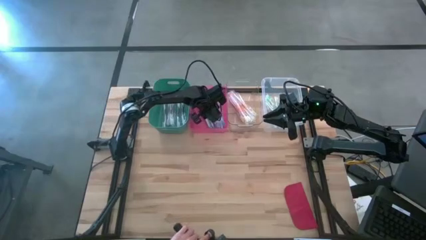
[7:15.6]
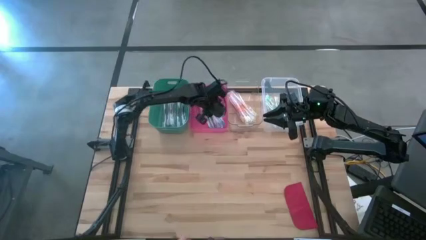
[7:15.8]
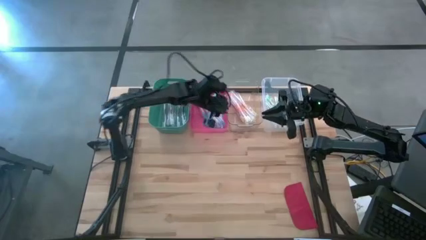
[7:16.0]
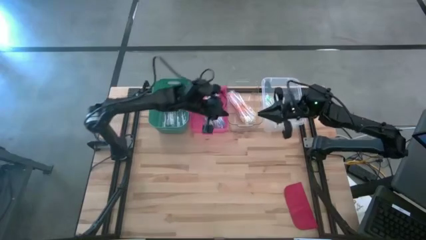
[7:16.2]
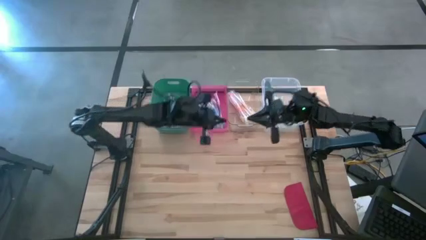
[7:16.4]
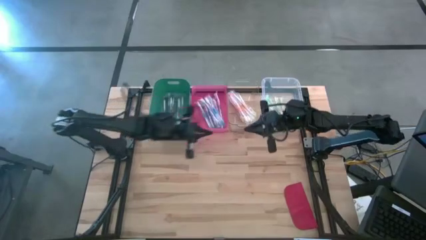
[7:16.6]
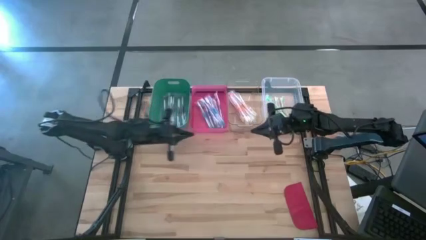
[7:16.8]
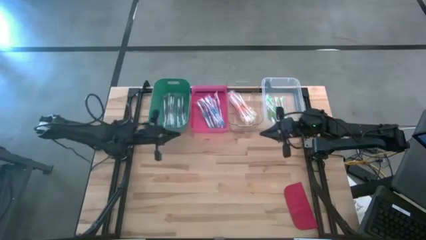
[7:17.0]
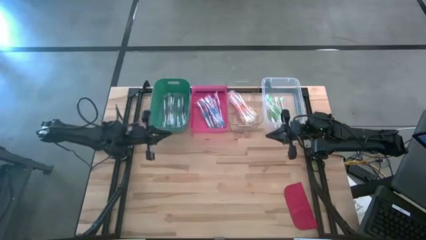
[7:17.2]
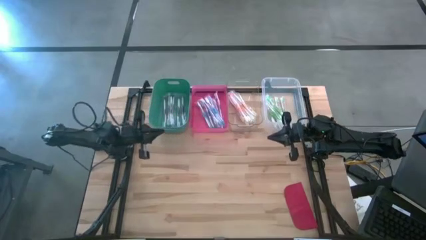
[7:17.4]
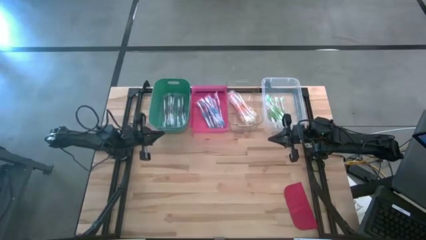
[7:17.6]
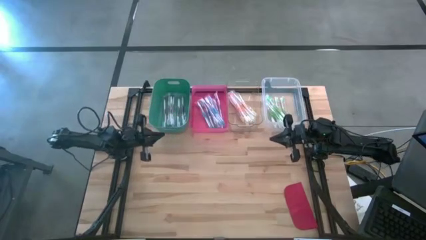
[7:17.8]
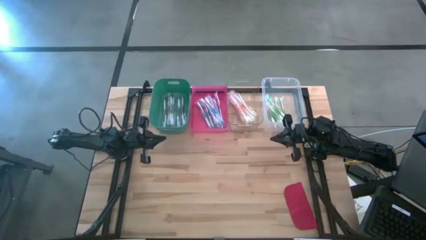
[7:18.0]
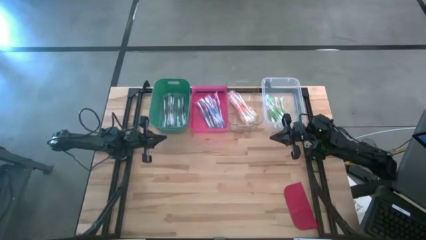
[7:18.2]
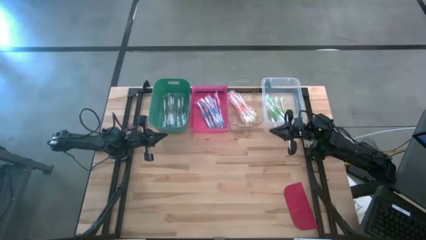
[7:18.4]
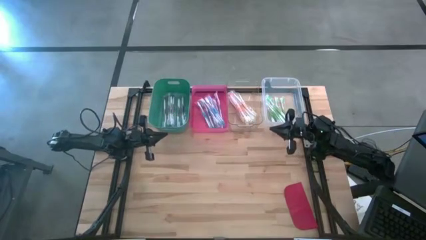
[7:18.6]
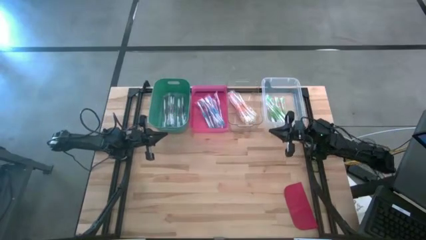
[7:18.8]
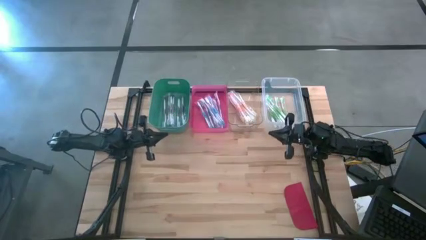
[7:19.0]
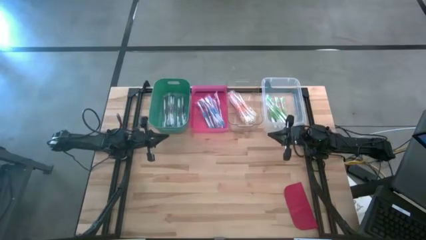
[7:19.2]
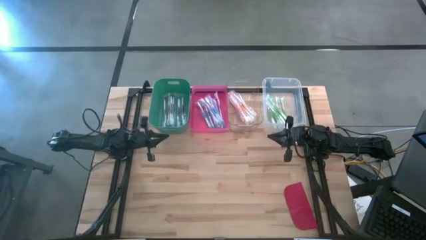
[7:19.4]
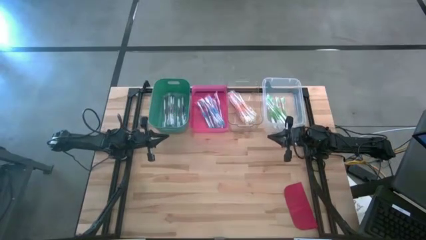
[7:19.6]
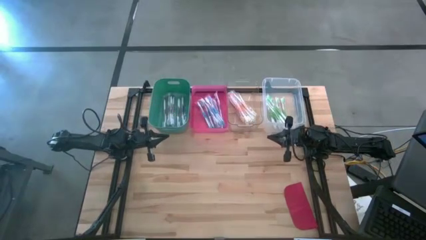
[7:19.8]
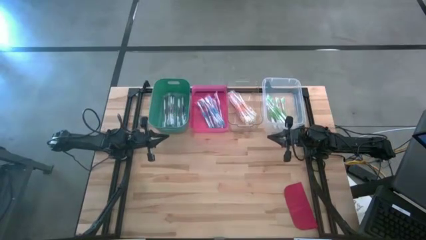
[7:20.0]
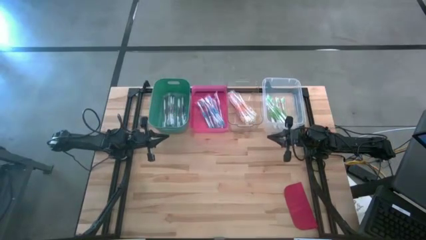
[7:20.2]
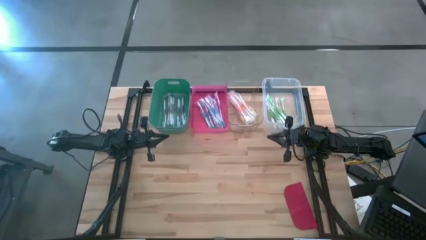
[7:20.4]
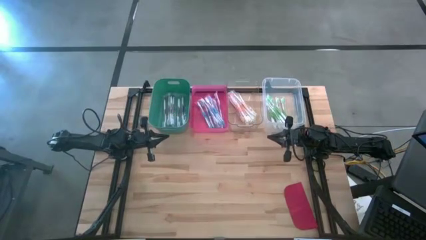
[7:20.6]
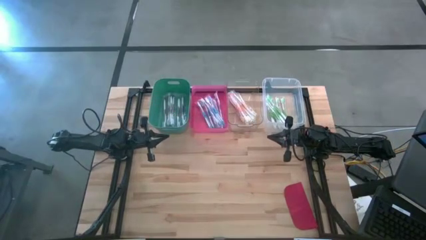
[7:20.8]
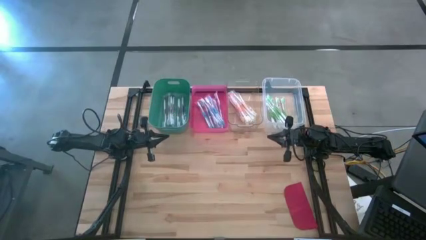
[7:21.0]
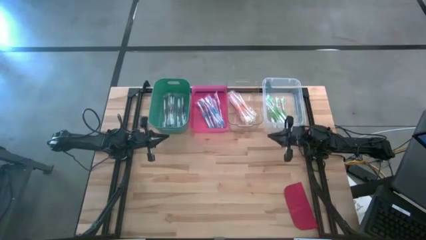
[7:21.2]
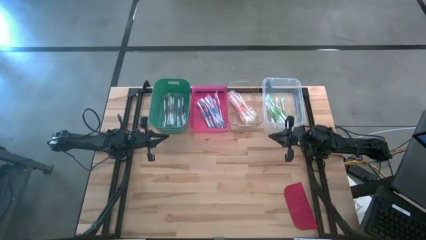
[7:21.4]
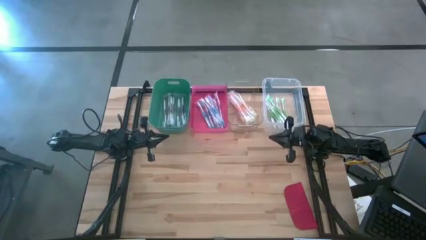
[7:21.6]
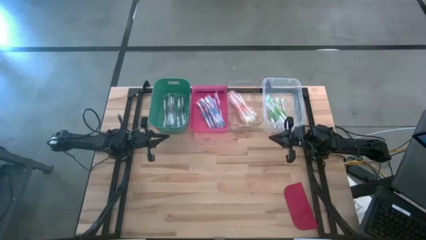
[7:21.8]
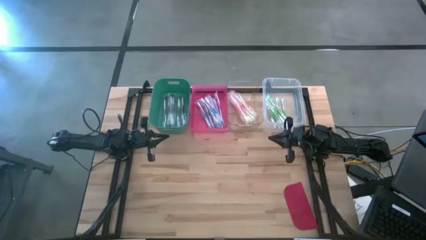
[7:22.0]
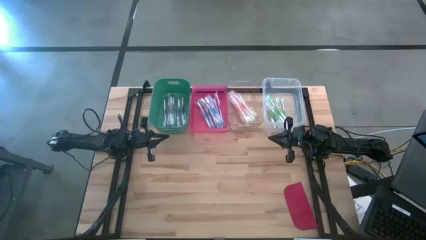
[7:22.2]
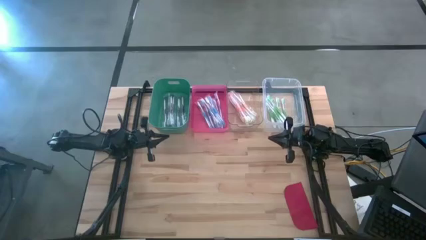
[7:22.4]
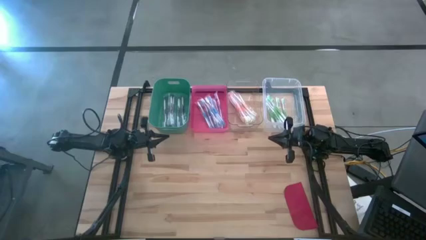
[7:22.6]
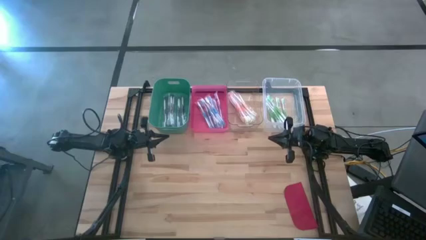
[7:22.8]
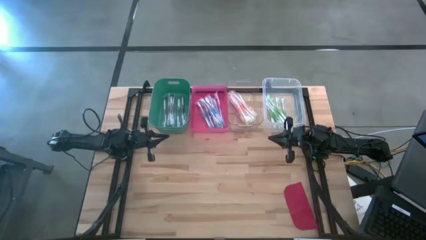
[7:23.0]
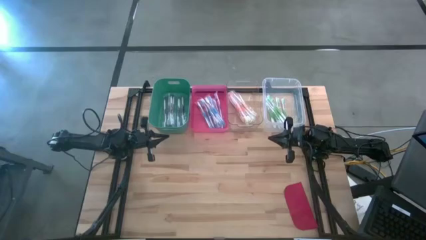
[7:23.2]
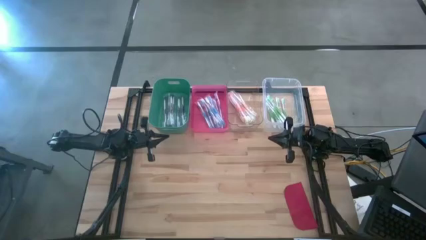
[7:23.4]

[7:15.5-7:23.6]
Task: Pick & Place Toothbrushes
Return to Home Position

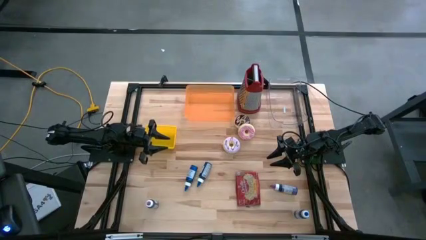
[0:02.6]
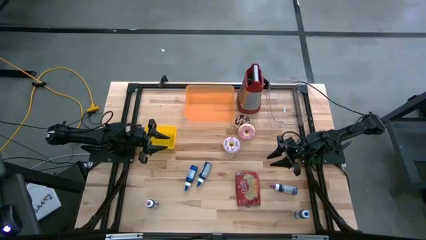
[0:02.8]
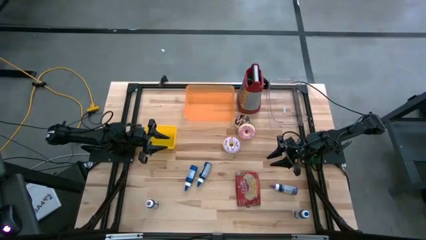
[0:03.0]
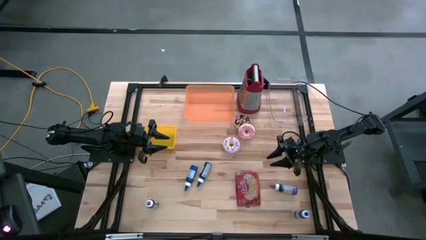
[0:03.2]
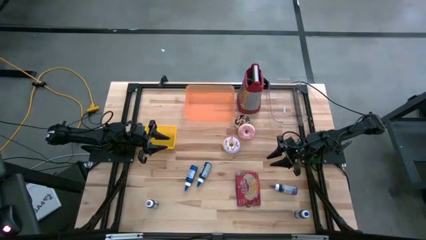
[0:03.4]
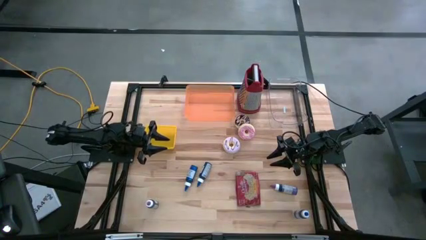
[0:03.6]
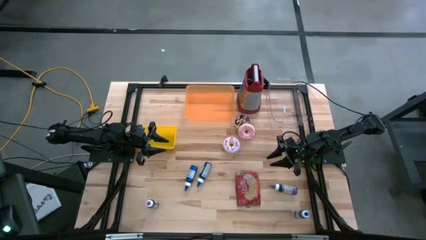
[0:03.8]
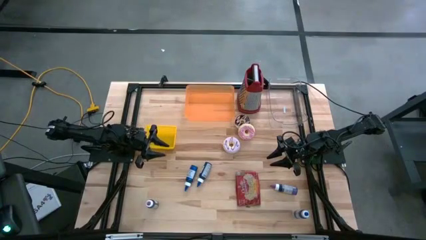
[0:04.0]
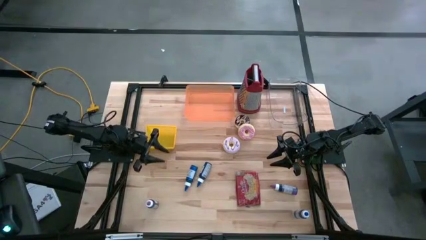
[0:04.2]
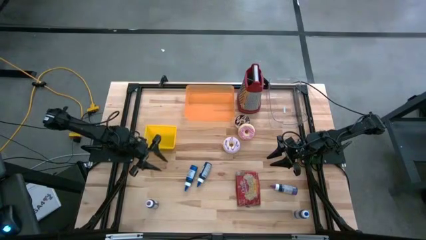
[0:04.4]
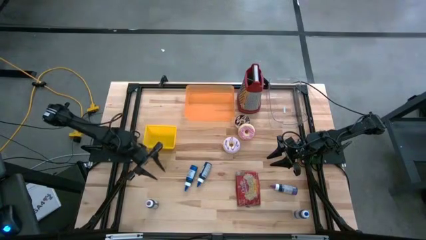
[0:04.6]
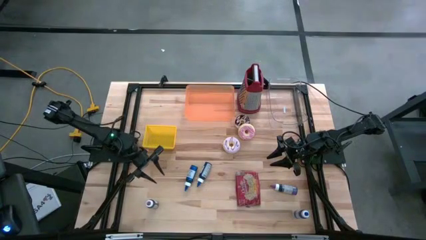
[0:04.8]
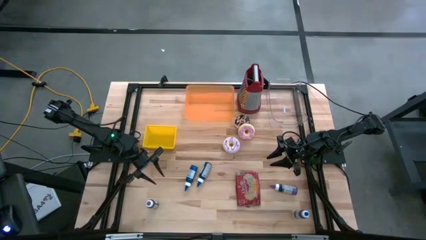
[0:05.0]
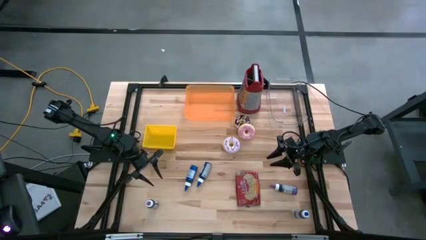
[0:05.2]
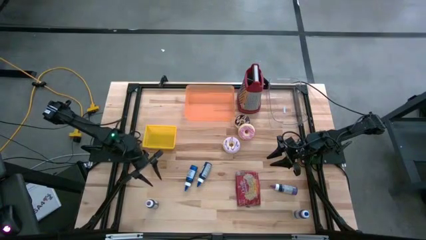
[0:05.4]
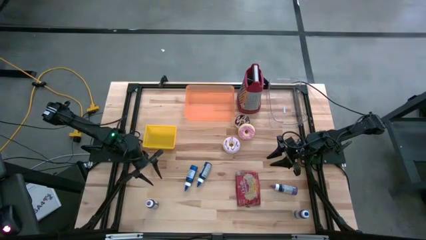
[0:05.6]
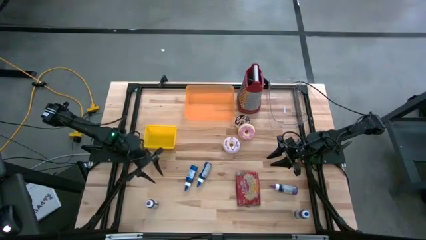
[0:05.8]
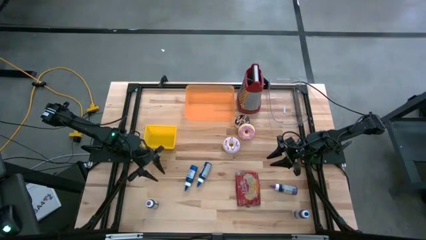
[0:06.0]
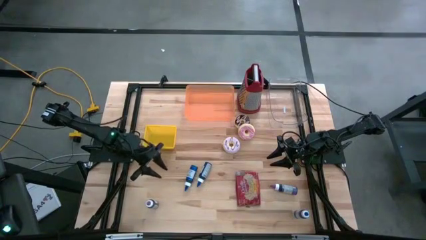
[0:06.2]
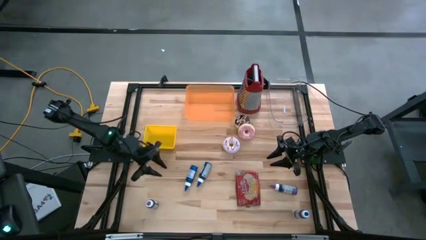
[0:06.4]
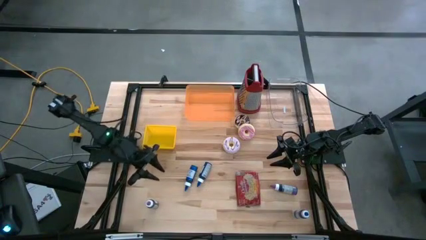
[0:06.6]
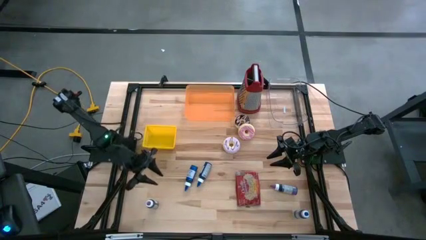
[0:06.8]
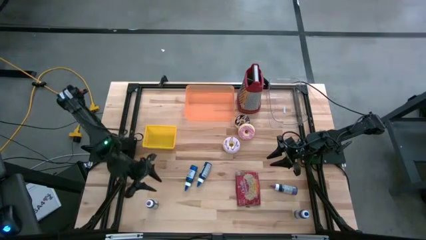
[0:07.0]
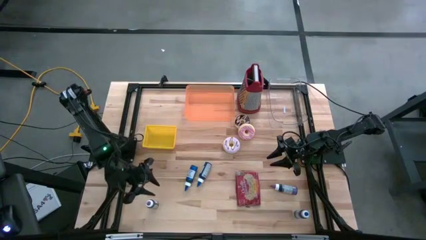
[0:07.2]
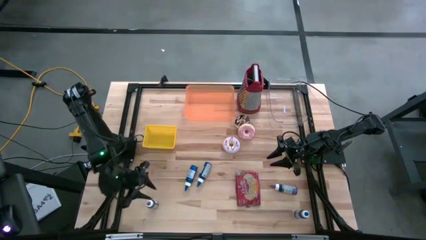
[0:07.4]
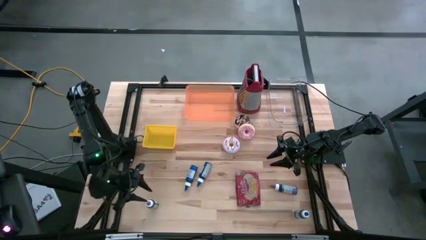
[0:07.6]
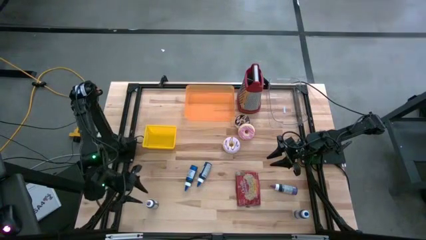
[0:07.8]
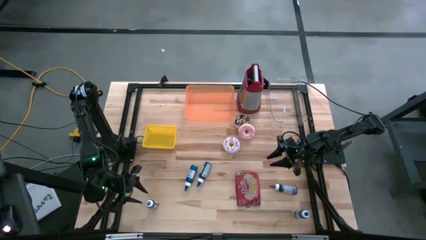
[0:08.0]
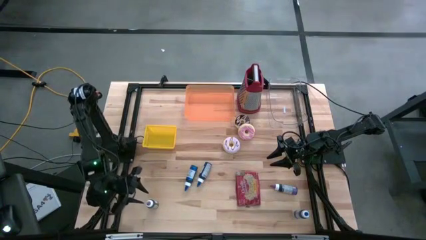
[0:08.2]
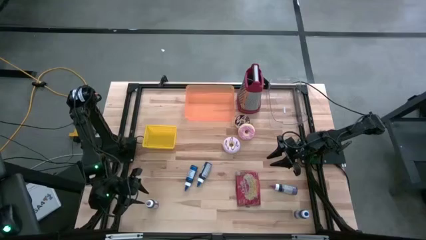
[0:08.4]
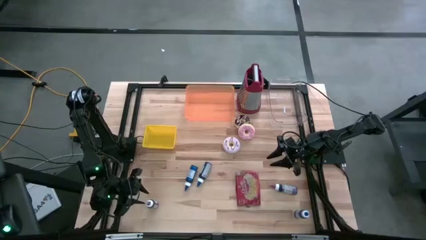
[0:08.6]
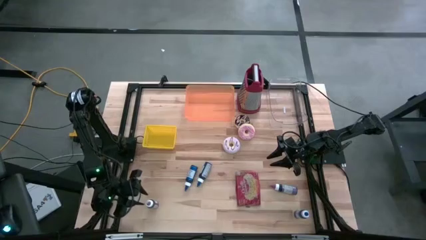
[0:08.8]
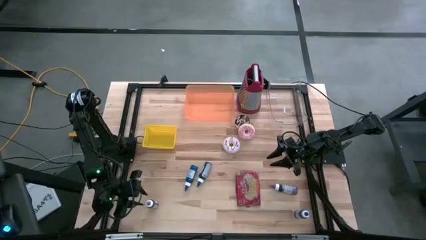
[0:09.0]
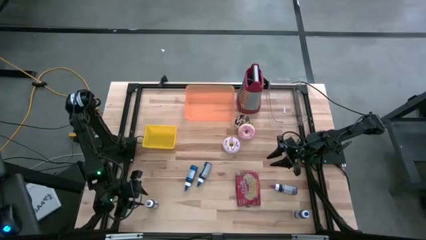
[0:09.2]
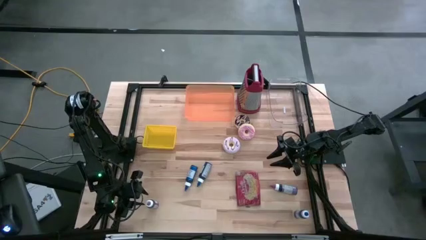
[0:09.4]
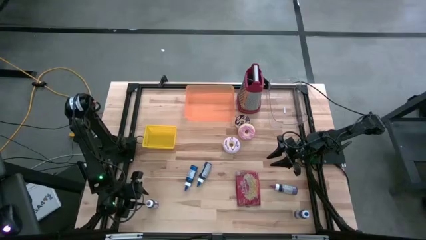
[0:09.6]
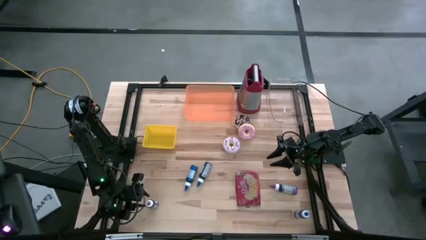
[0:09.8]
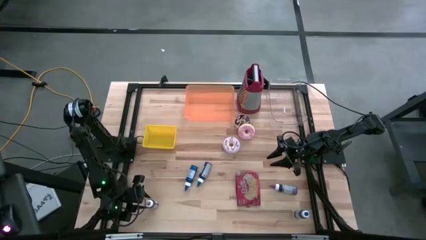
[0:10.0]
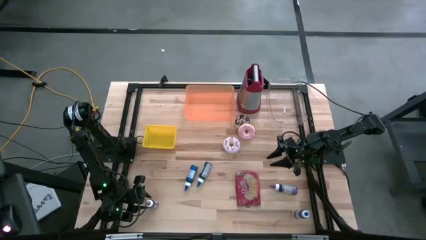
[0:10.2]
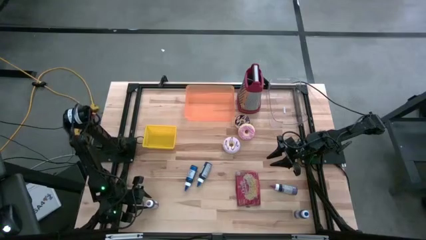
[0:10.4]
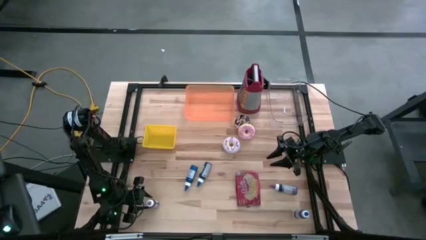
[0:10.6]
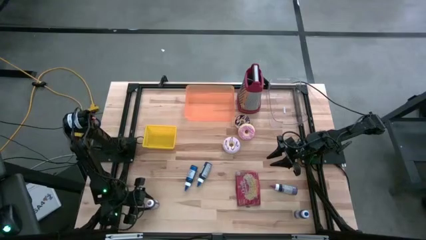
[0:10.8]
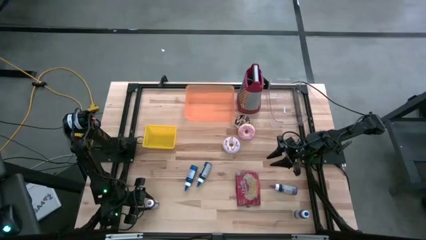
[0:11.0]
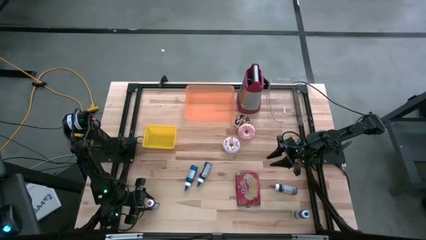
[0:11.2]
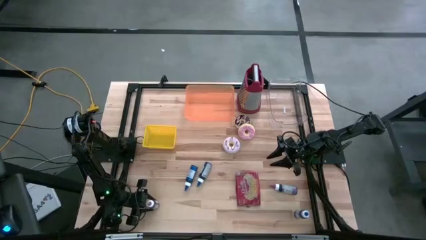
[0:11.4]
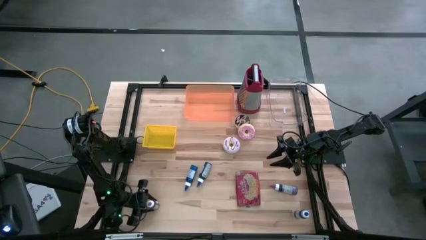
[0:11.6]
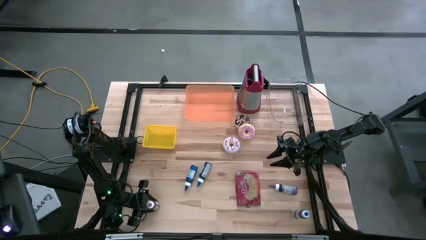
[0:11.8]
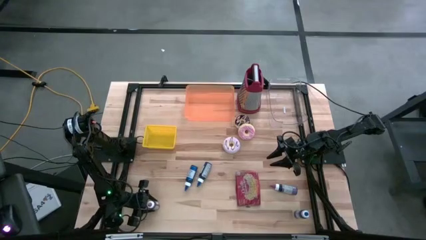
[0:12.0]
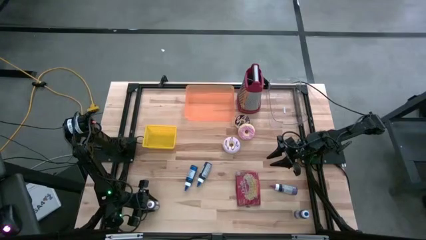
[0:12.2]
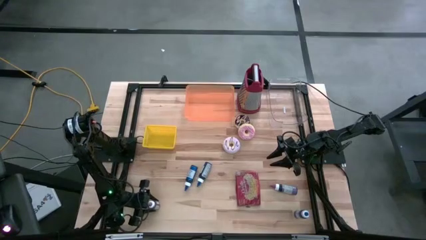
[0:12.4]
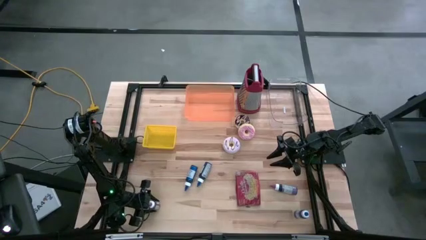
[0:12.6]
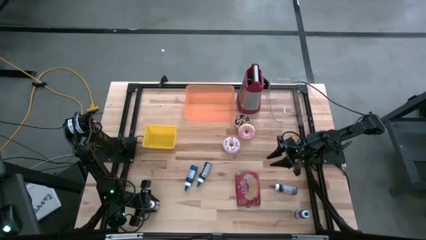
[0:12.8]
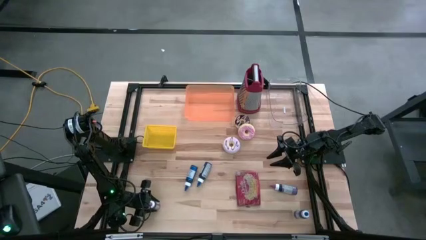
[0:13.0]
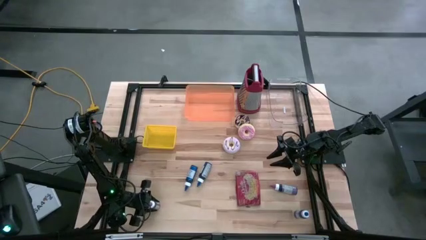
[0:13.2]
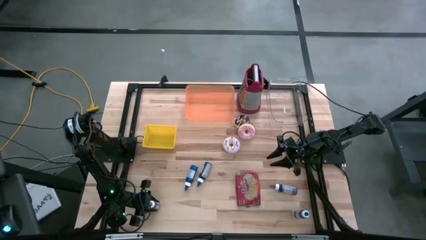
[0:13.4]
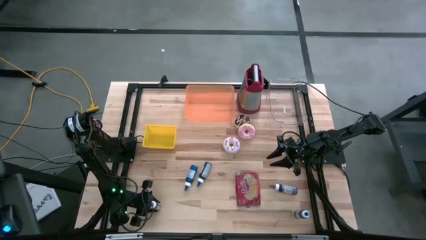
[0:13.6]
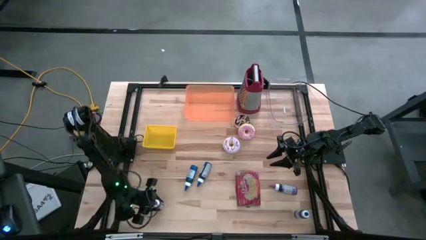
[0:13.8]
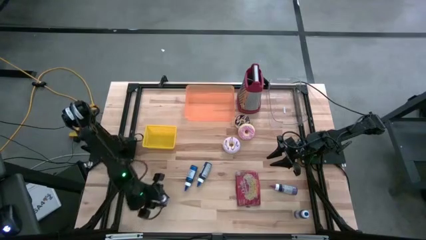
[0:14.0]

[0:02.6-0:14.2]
Task: Pick & Place Food Item
Put the left violet food coloring bottle into the transparent bin
